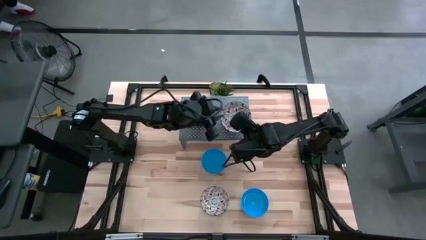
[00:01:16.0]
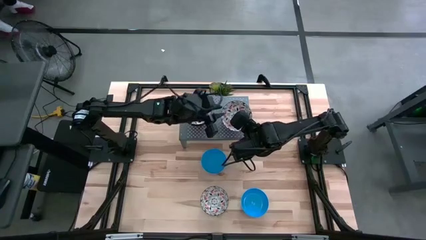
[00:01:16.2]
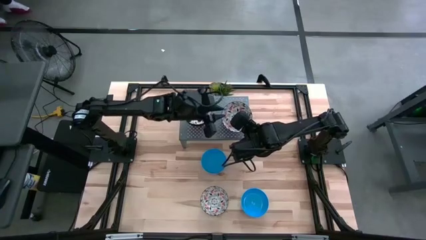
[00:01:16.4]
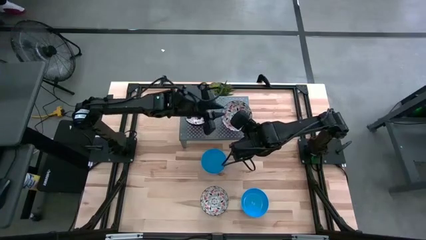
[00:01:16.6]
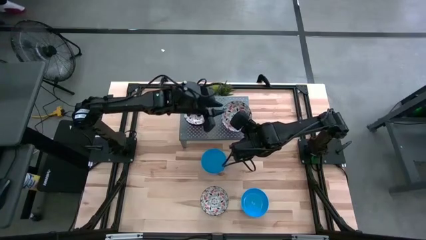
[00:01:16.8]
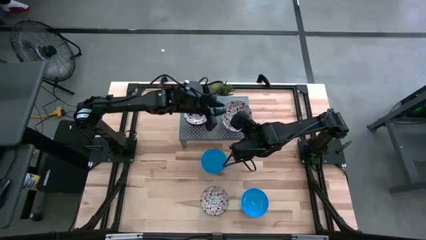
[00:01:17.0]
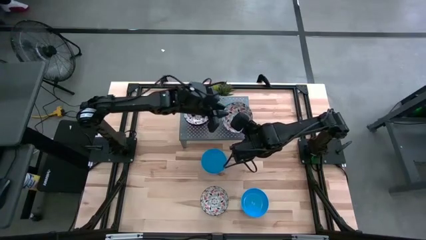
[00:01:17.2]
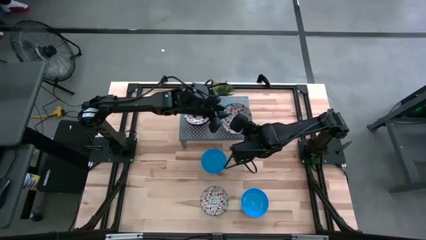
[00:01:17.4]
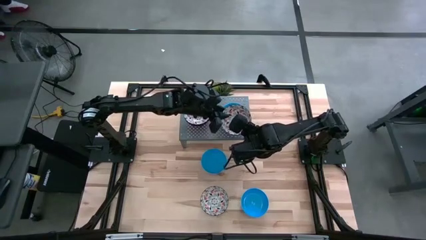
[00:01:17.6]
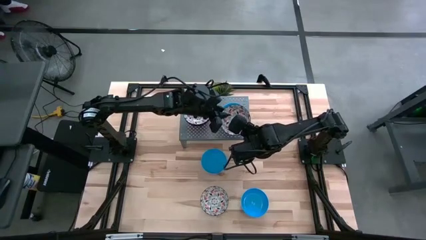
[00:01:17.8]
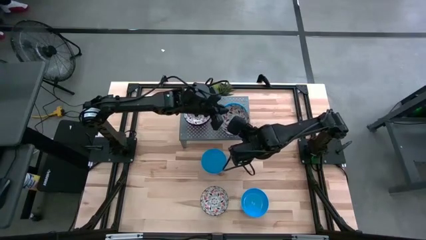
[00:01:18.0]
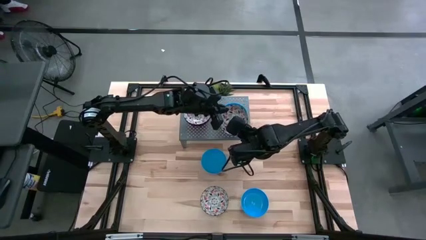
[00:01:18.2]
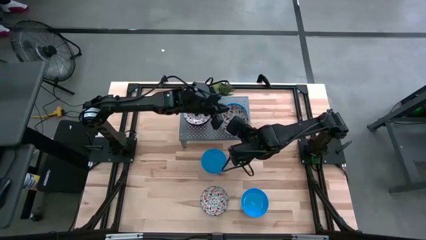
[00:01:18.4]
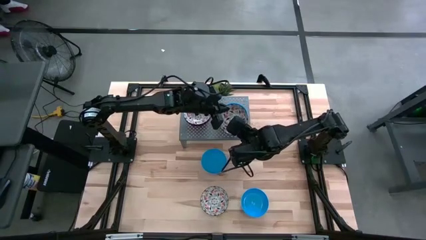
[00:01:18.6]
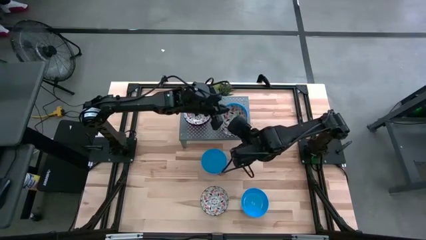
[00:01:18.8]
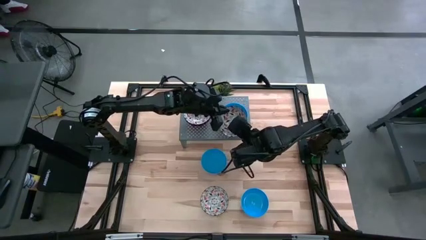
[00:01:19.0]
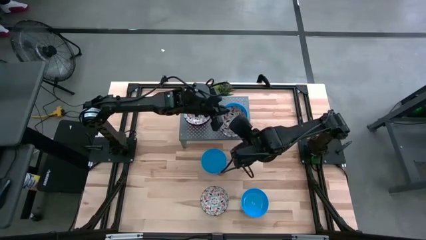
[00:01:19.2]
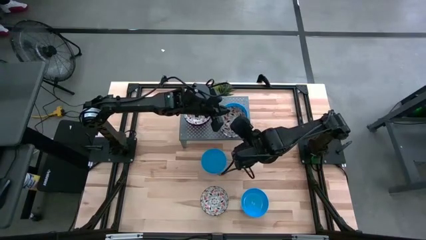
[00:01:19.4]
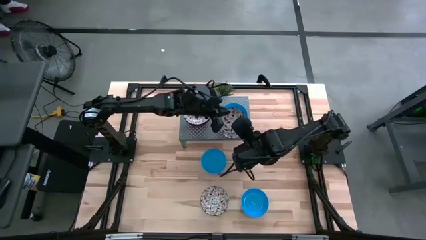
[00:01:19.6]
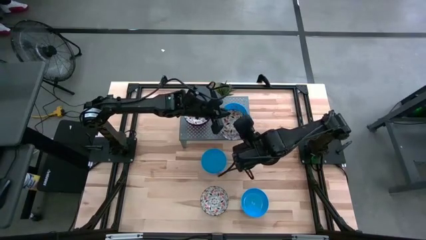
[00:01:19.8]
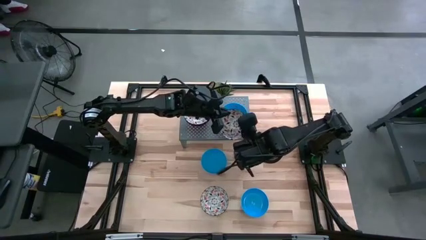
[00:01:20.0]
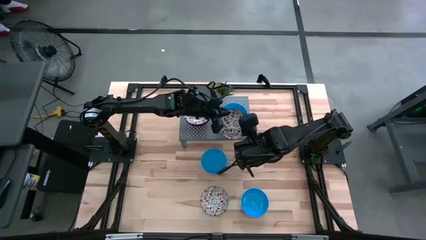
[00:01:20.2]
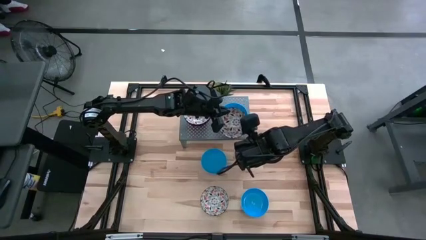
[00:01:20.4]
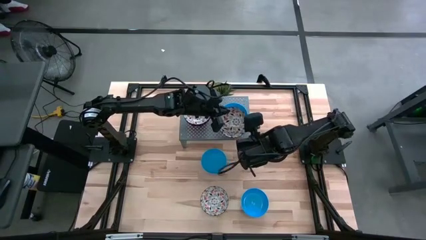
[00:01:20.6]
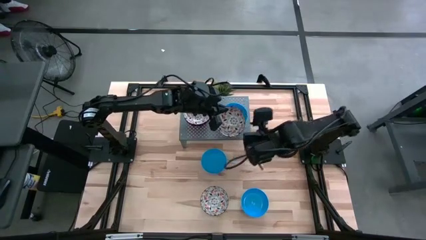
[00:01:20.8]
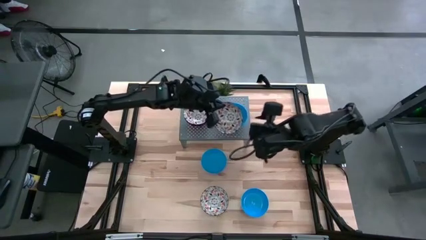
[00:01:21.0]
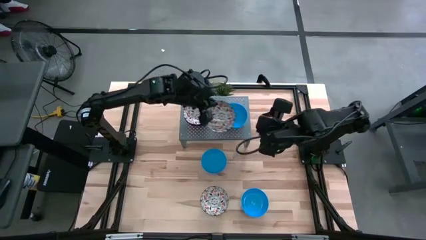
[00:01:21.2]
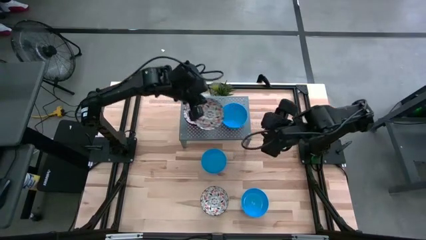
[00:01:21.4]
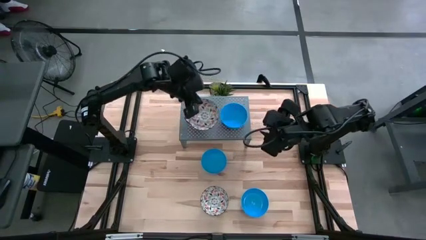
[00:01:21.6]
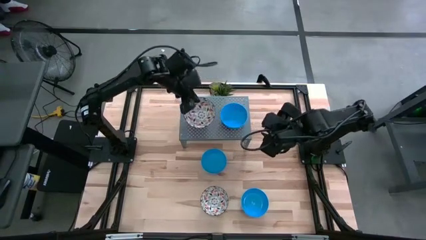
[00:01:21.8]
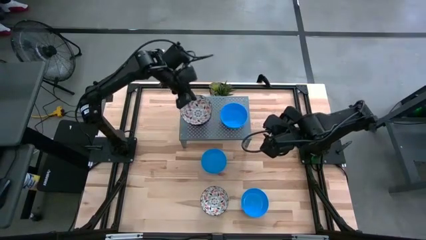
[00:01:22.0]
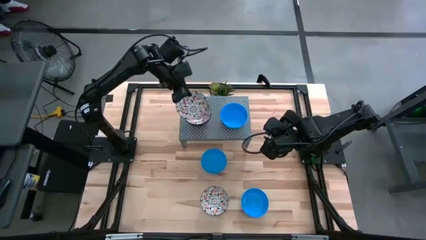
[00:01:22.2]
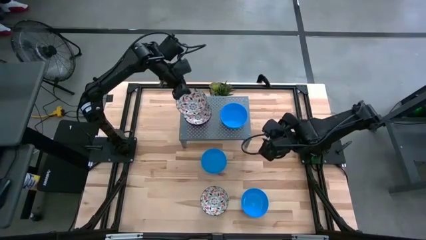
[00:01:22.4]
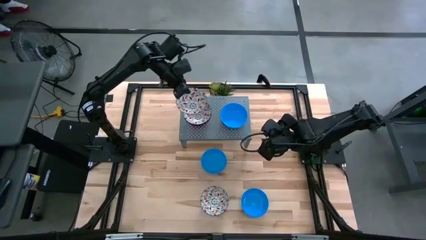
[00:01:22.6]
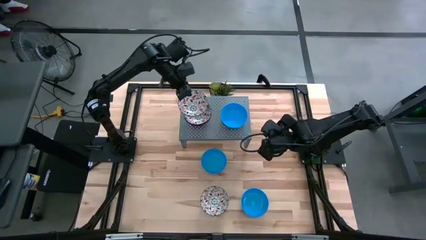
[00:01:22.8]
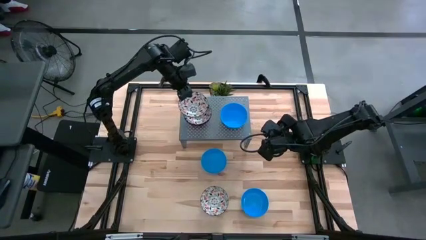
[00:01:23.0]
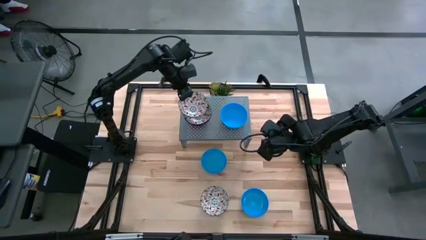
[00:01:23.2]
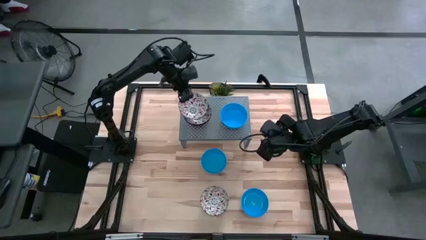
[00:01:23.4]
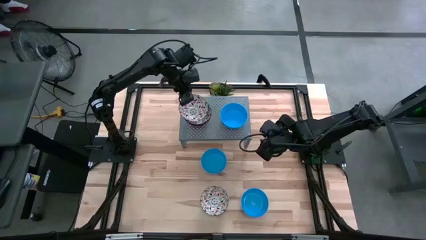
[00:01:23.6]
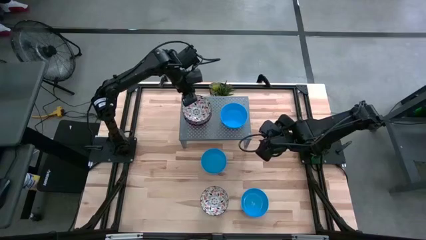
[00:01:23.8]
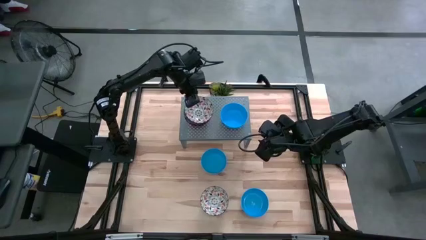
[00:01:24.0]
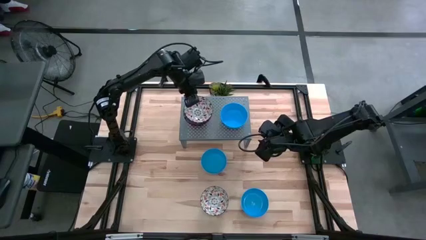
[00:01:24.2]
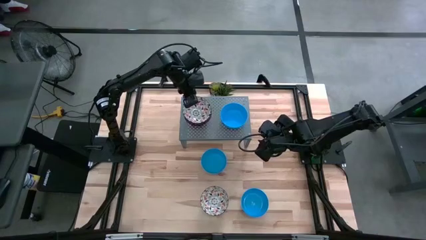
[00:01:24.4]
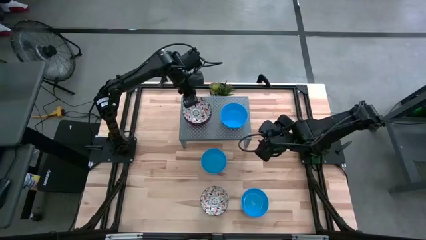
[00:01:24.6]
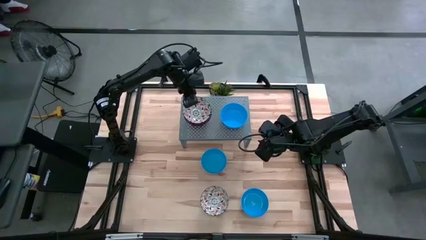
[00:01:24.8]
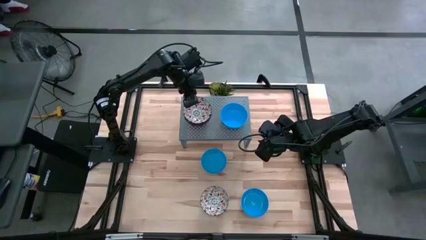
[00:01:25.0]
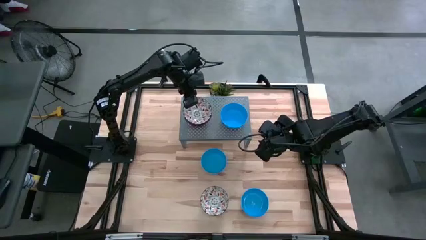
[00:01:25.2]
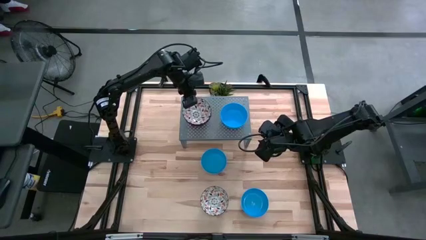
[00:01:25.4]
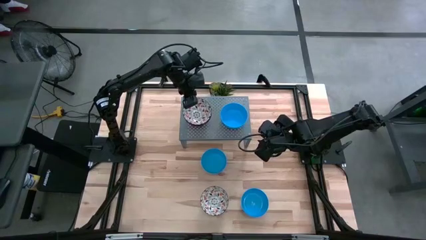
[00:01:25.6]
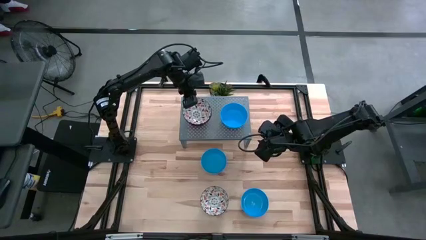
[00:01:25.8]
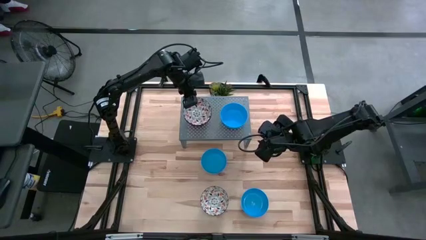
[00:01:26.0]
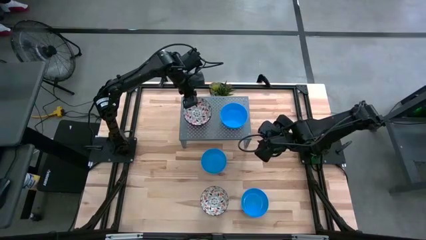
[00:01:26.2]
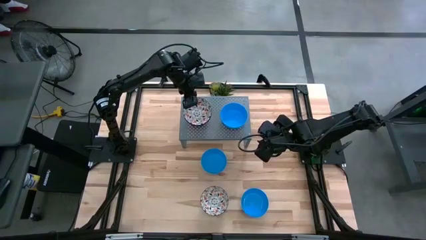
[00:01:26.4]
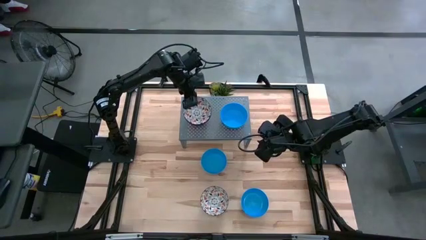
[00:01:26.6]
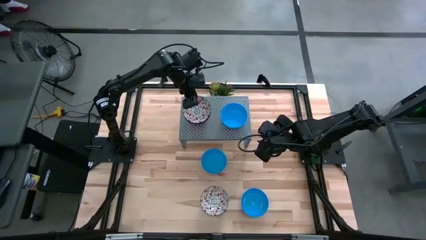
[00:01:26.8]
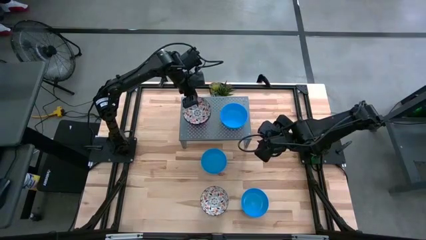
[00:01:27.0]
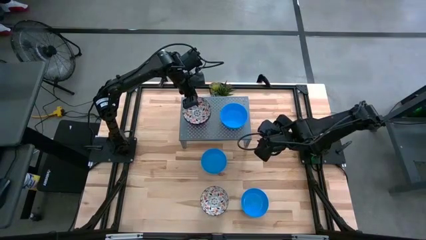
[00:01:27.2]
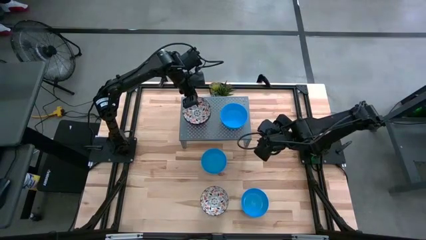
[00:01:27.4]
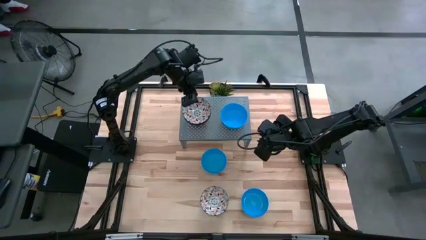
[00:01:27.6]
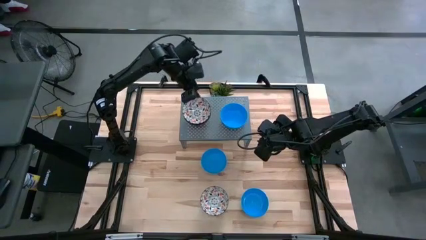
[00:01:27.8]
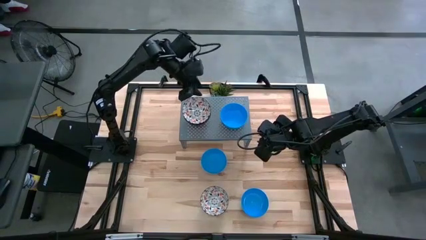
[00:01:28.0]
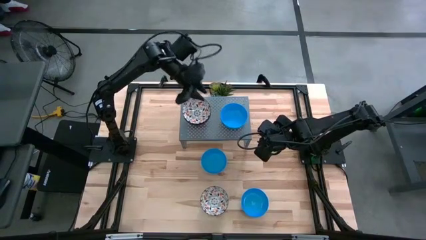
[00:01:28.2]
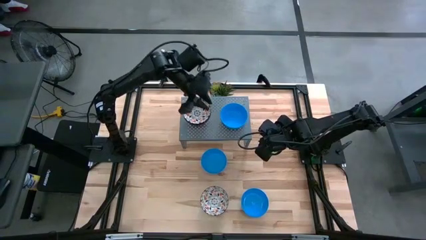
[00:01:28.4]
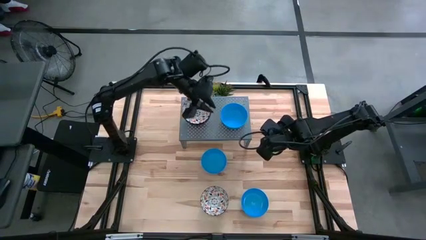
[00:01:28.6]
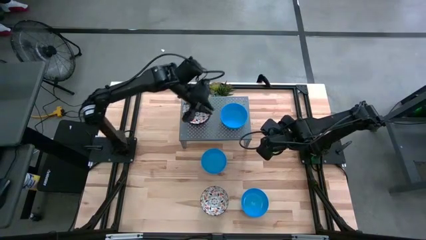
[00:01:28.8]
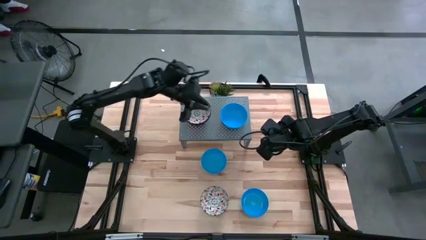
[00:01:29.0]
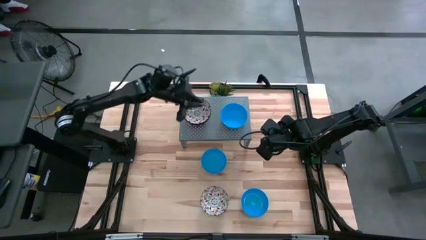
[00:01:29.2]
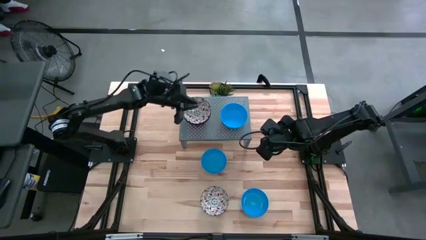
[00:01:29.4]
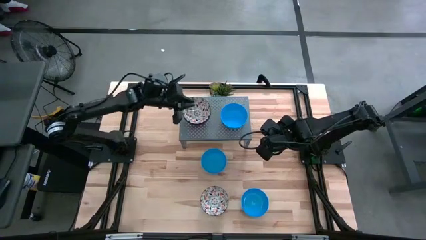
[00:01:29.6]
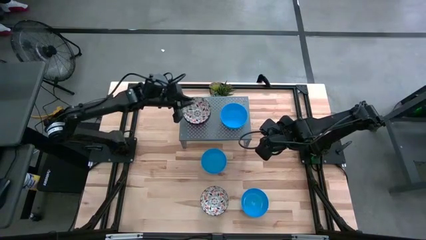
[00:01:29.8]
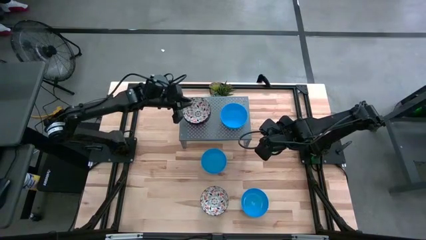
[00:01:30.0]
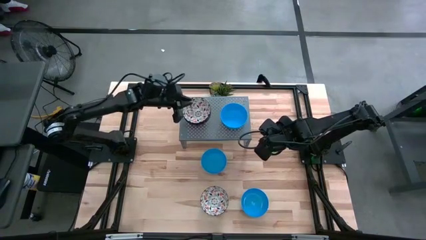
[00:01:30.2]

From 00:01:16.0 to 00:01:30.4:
Task: Pick & Place Mini bowls
Stack the white patterned bowl on the stacked white patterned bowls on the shelf
